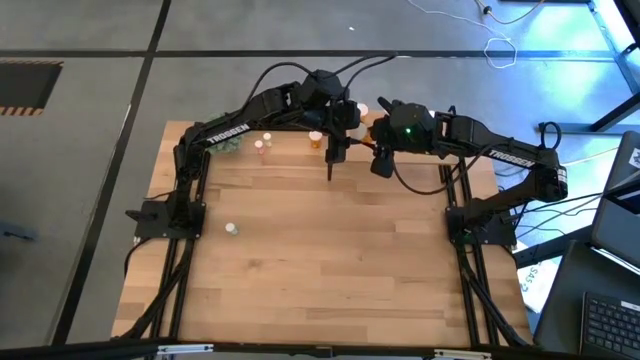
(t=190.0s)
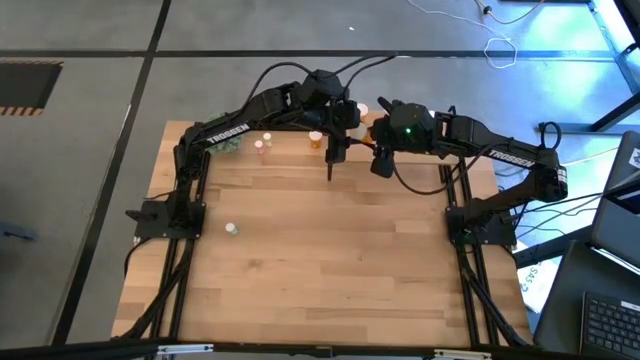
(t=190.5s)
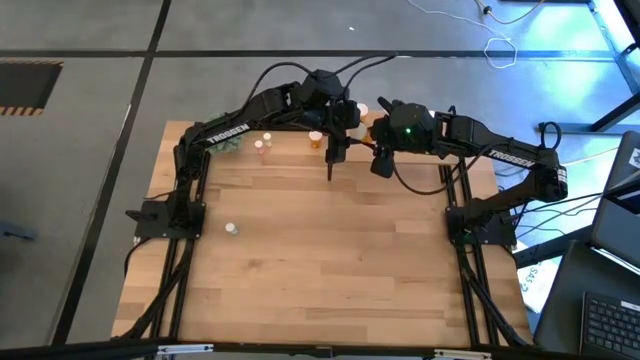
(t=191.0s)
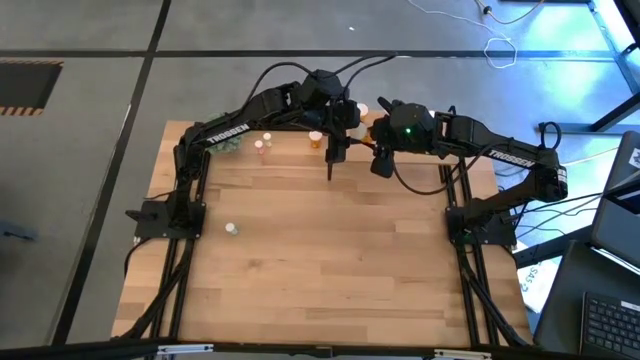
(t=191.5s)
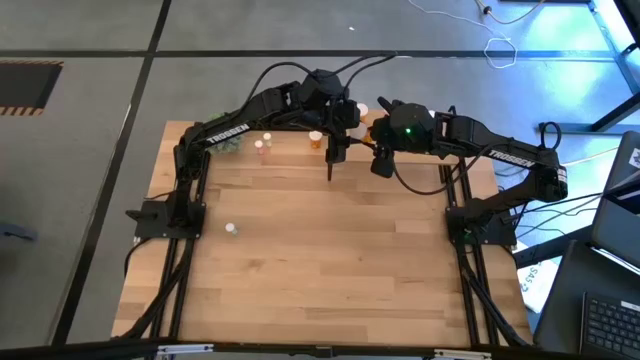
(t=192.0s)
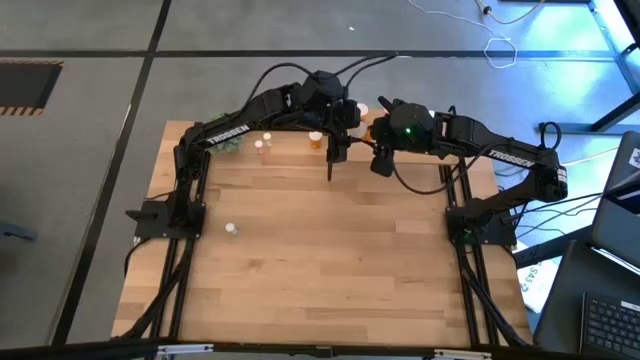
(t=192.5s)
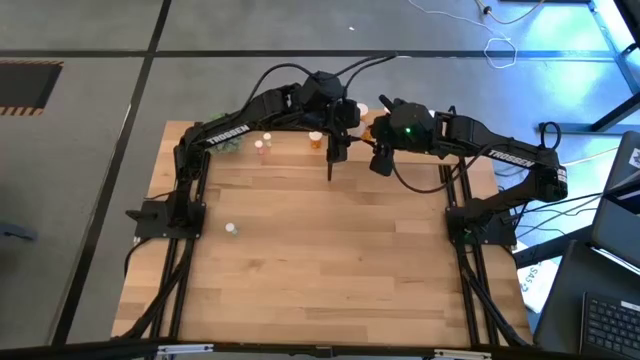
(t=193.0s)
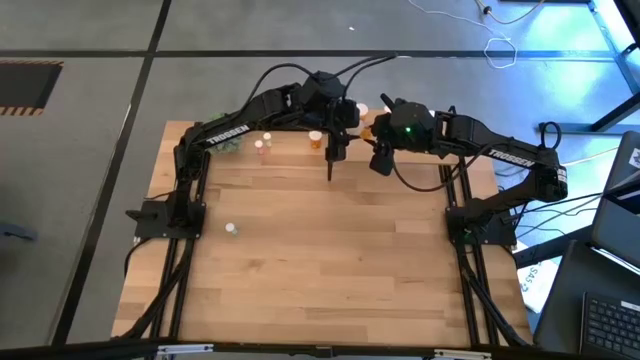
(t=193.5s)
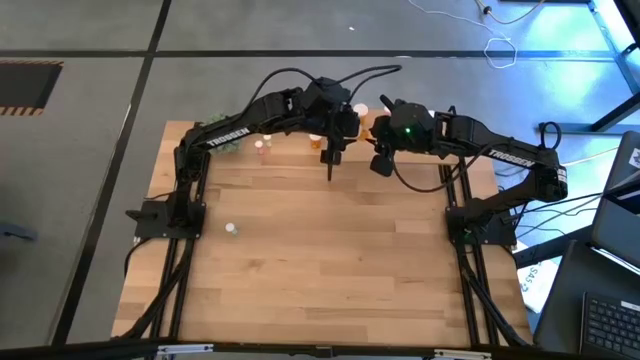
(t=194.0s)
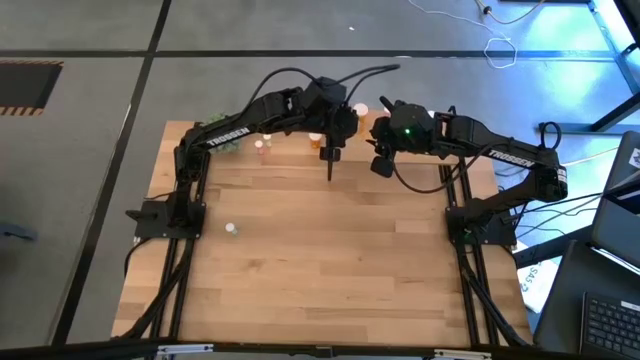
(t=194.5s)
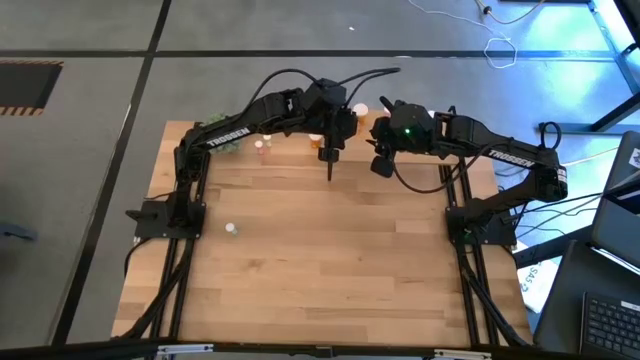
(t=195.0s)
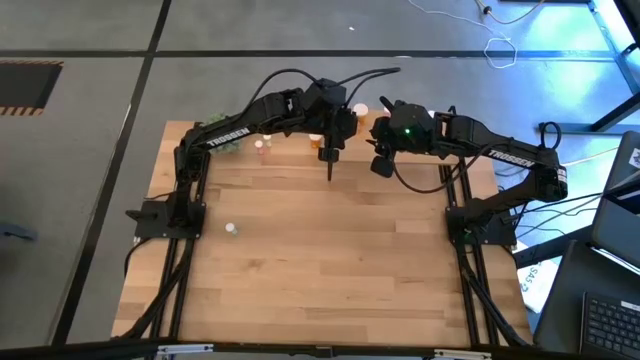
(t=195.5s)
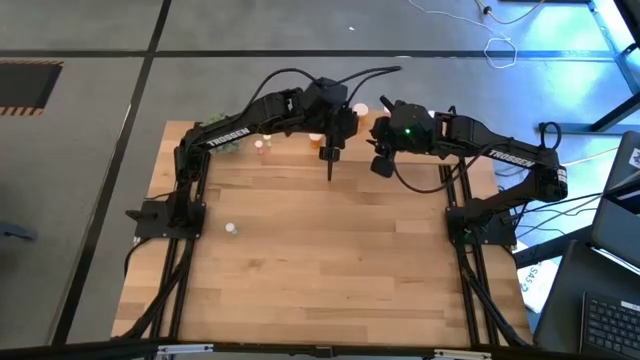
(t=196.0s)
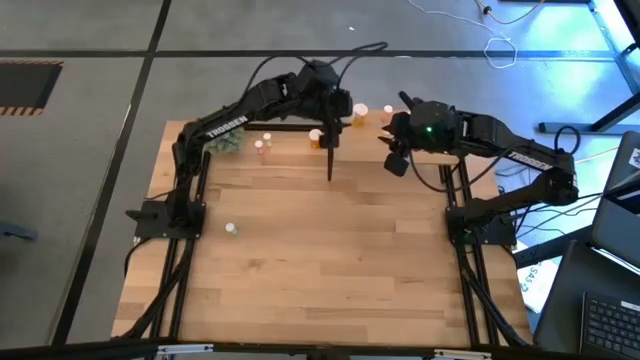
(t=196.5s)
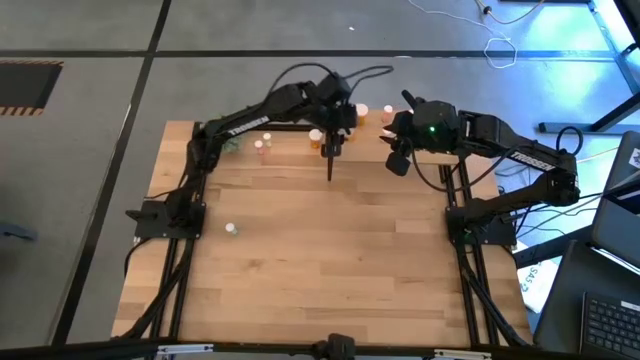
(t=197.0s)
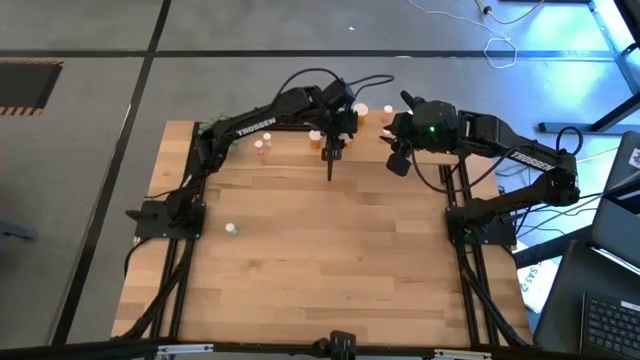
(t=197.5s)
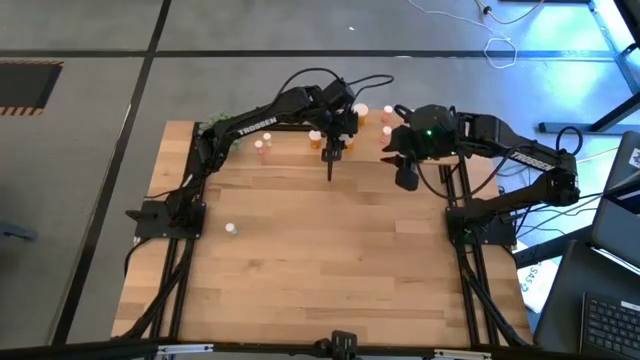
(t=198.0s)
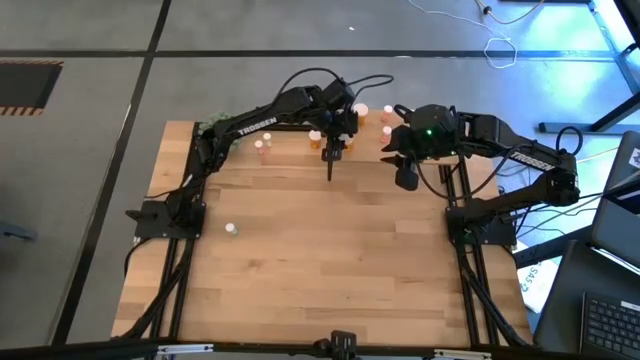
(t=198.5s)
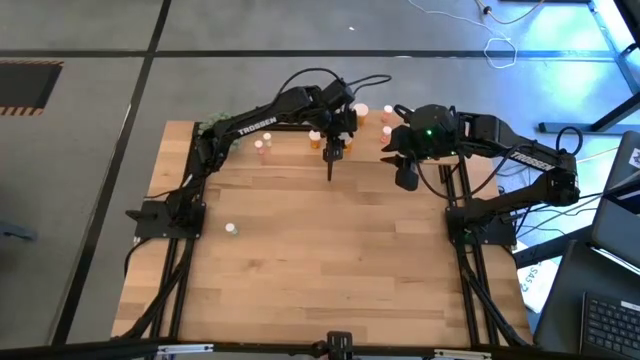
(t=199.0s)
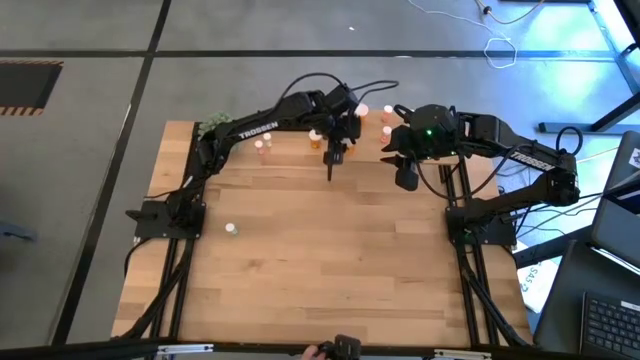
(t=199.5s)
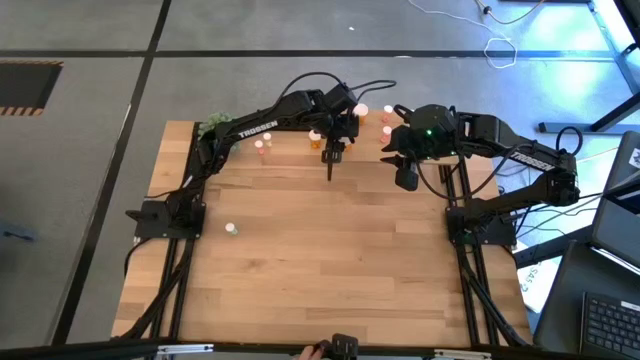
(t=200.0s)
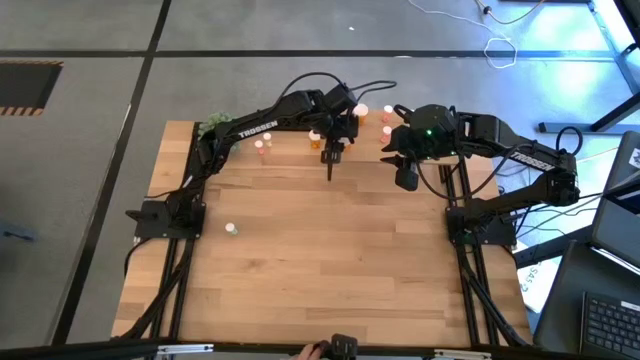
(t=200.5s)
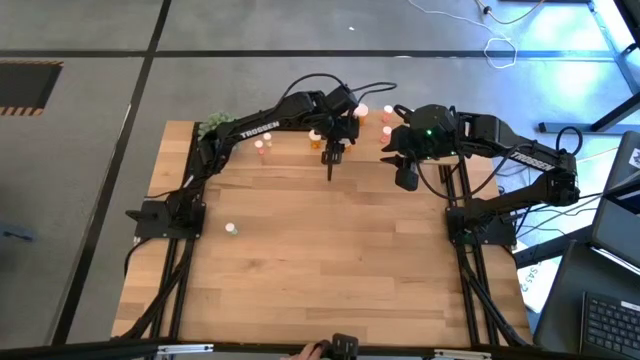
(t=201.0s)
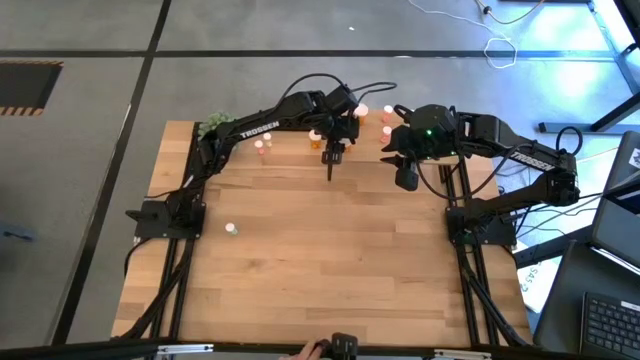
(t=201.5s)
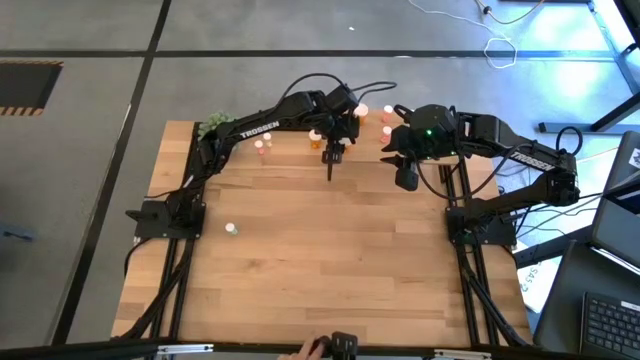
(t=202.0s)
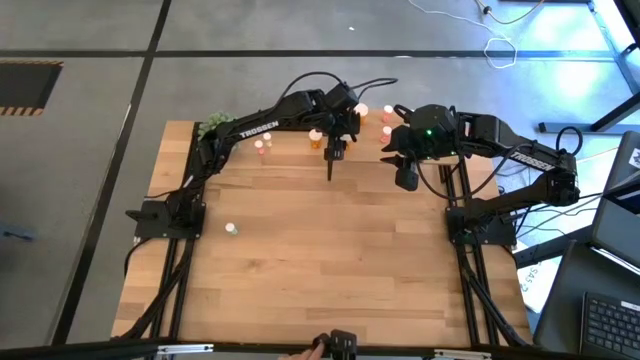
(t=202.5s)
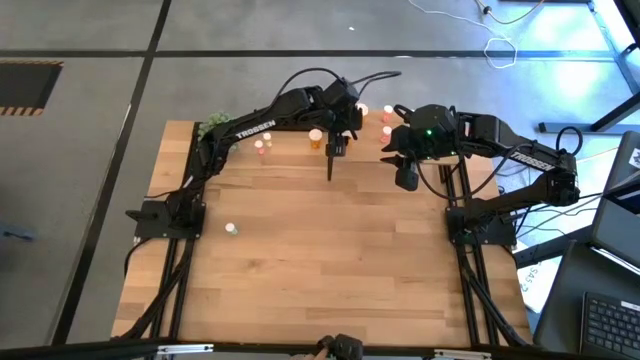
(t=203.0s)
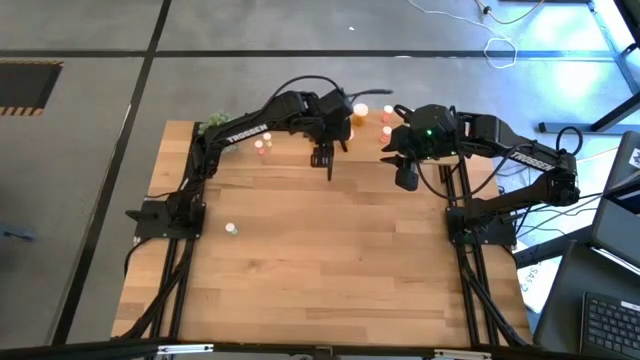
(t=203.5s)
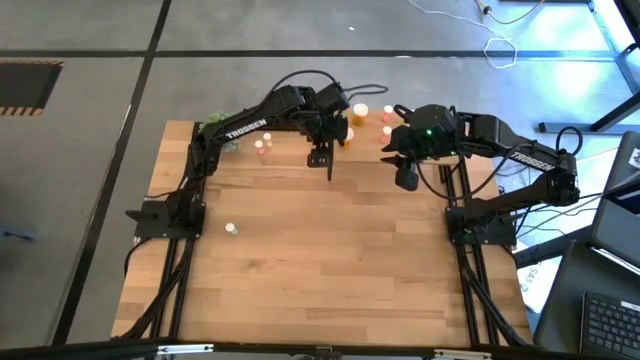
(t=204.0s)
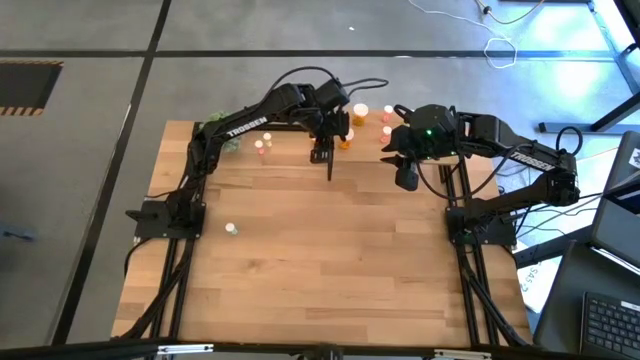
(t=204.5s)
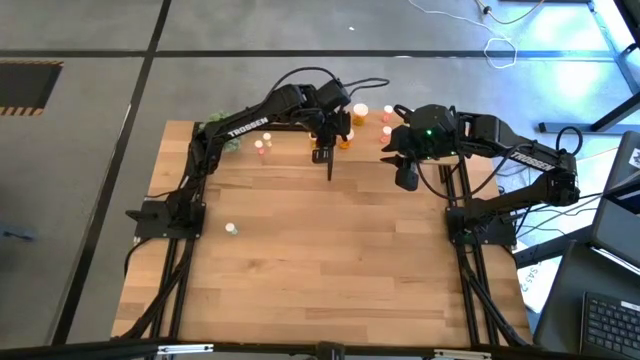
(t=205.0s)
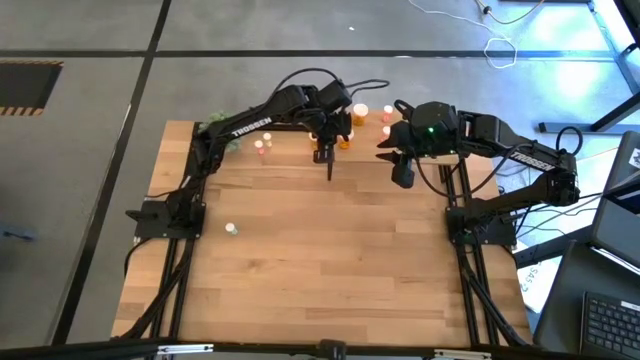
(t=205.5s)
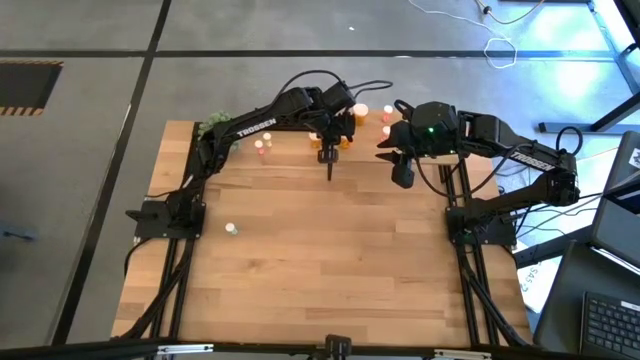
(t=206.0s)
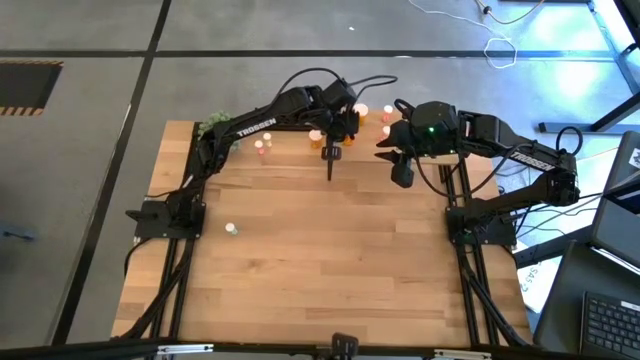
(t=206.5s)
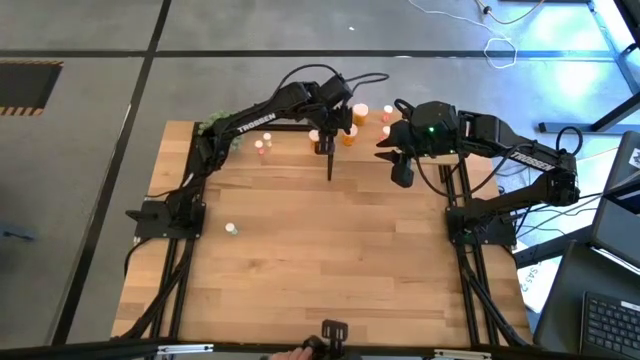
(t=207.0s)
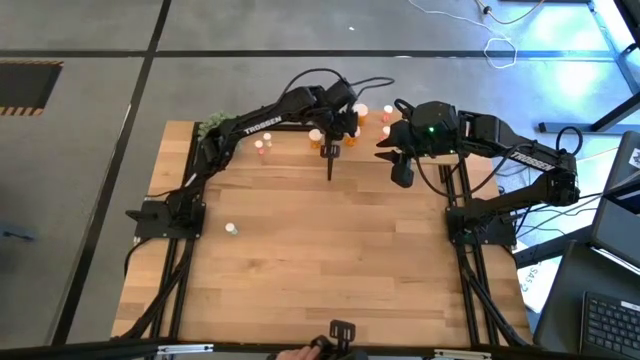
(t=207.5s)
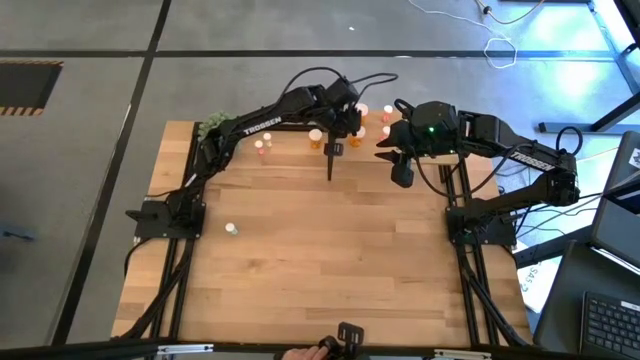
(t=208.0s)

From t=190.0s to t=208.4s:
Task: Pick and place medicine bottles onto shelf by color
Put the bottom orange pill bottle on the shelf aligned with the other orange pill bottle

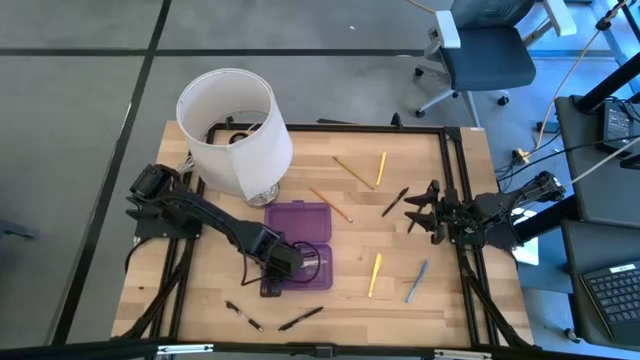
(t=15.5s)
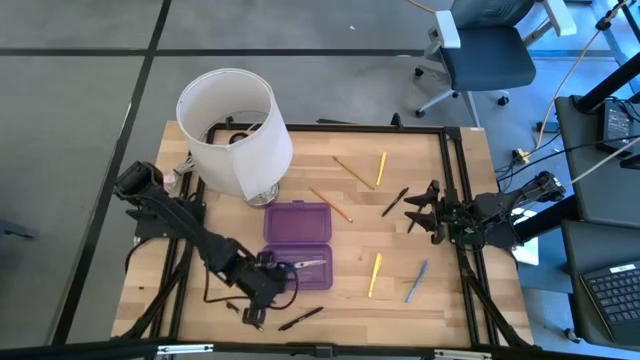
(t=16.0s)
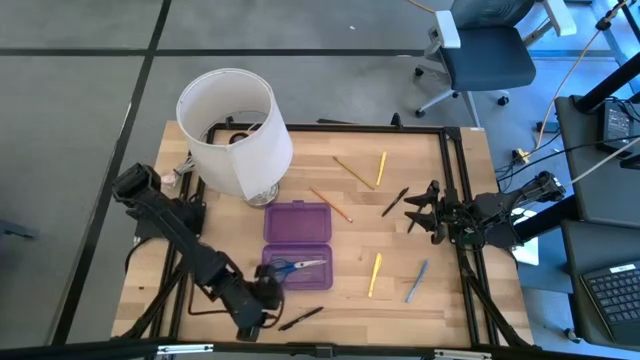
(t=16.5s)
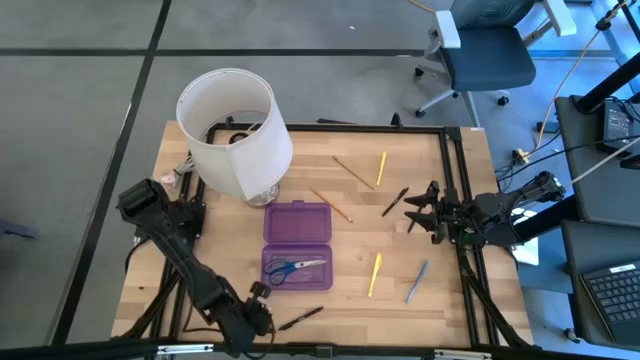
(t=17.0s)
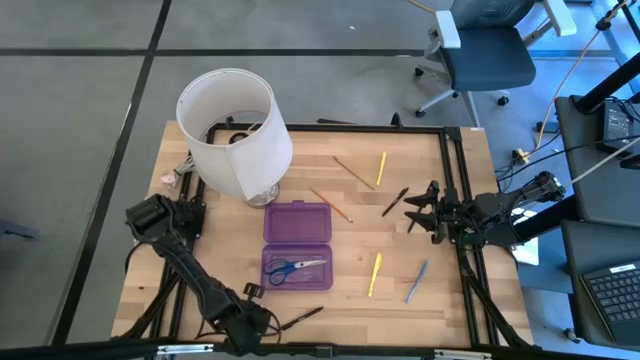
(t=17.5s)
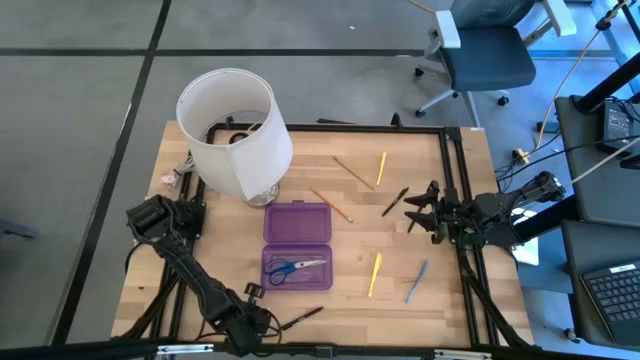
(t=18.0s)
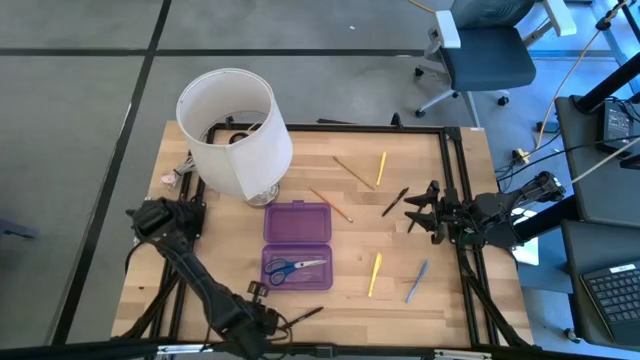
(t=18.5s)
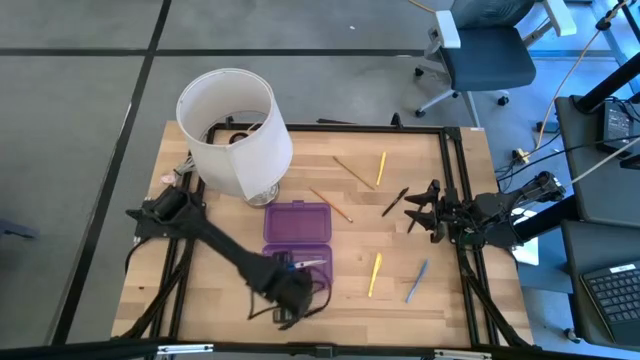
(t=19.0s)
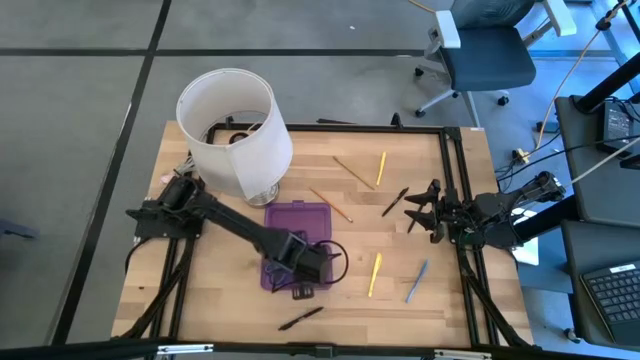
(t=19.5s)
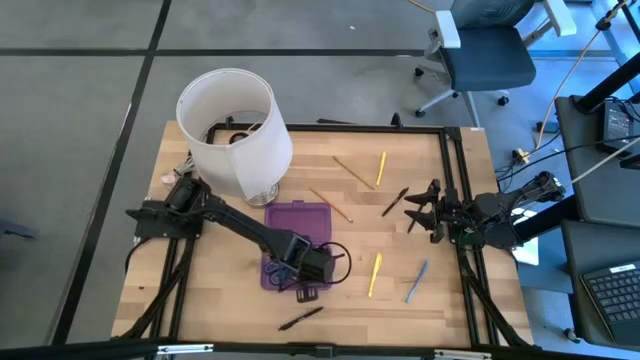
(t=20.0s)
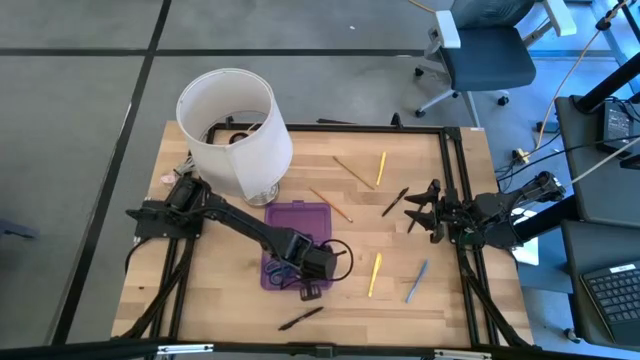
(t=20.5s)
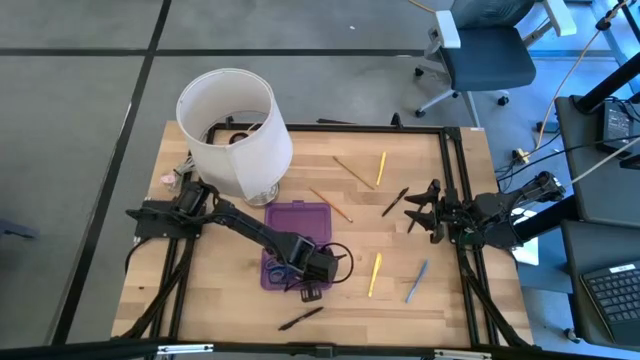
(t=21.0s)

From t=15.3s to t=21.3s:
Task: Pick & place school supplies into a supply box
Put the black pen into the purple supply box
